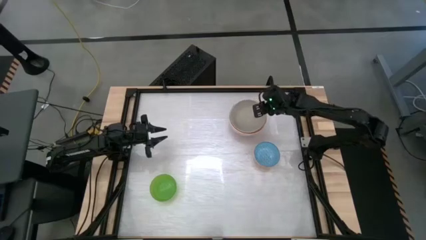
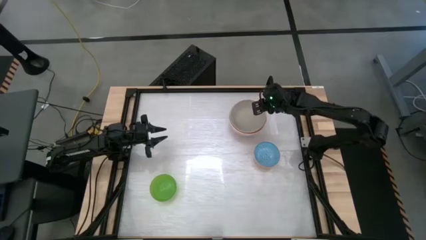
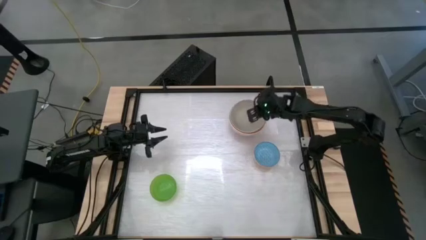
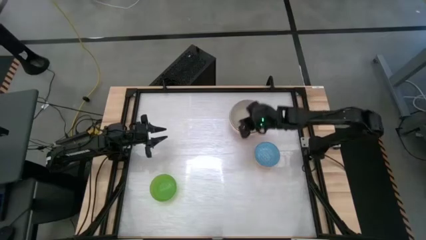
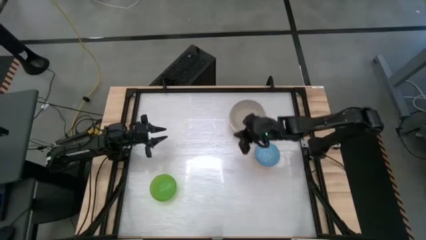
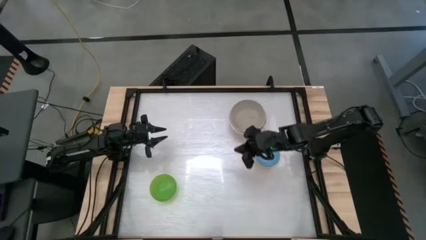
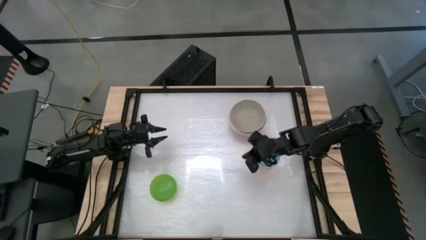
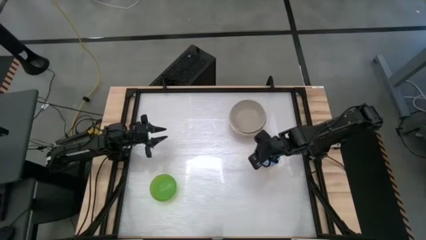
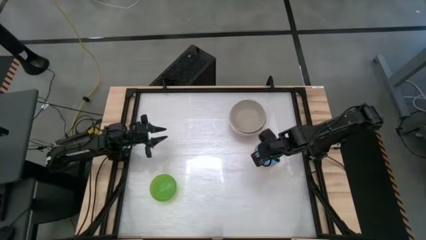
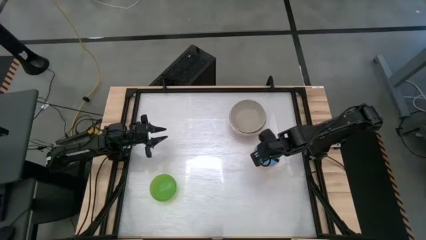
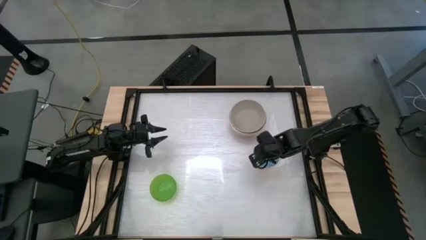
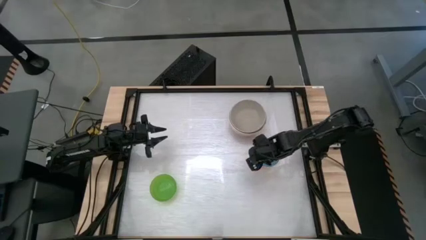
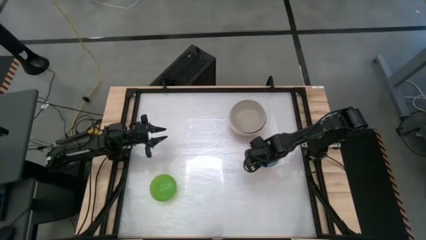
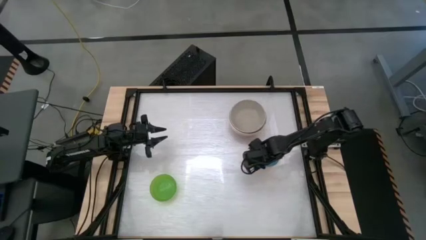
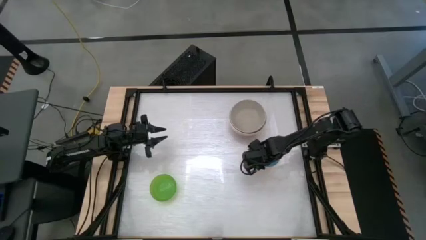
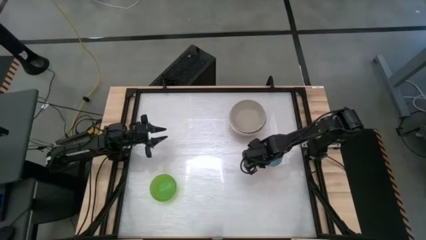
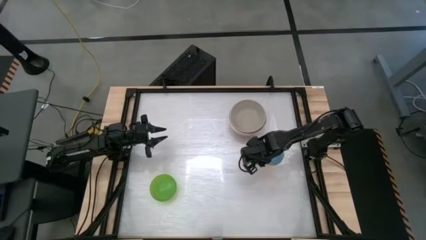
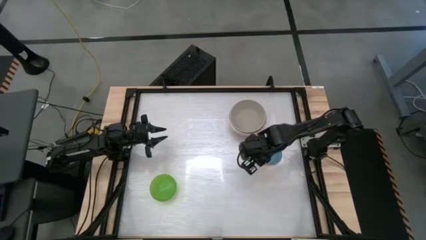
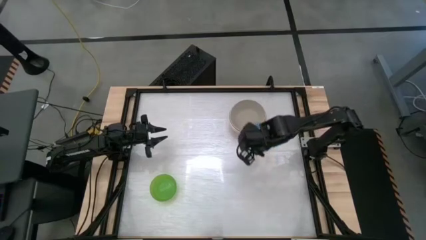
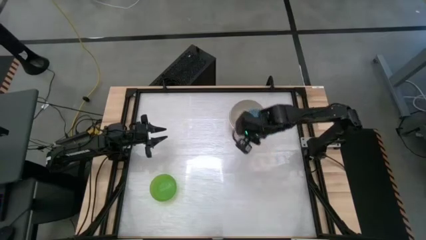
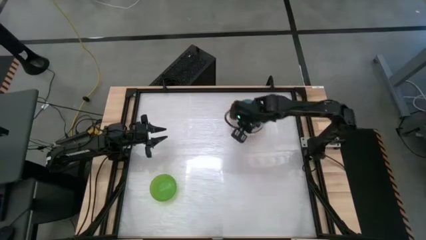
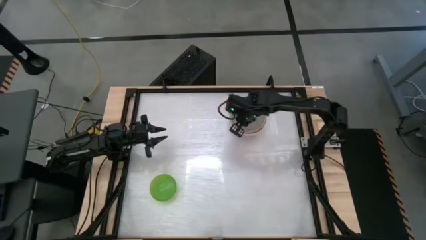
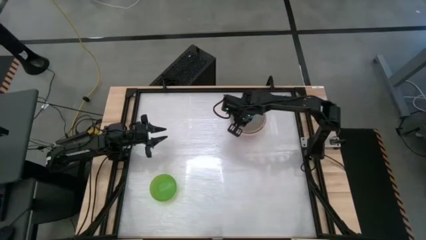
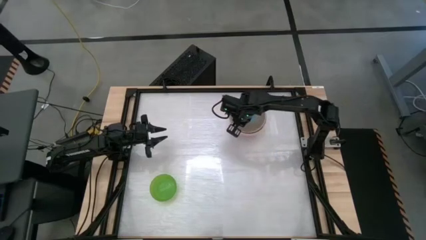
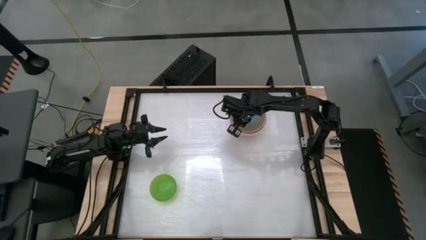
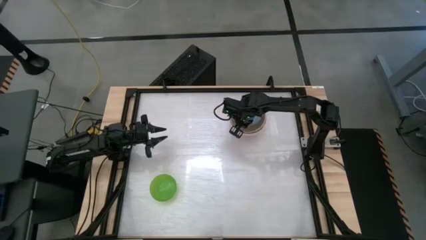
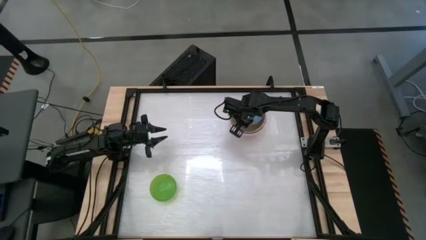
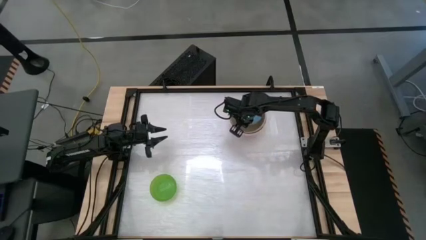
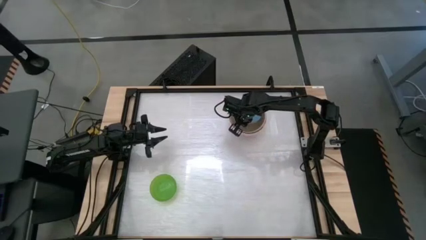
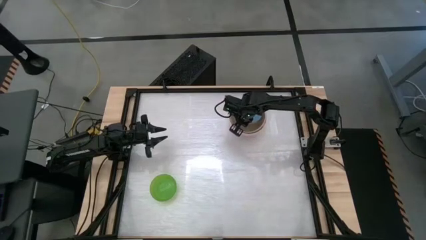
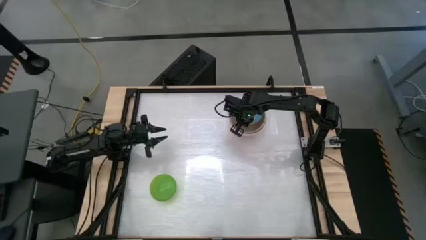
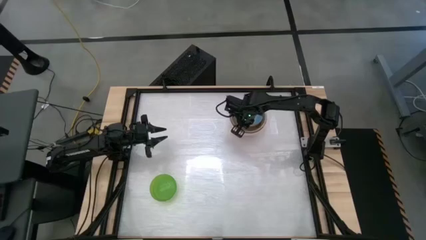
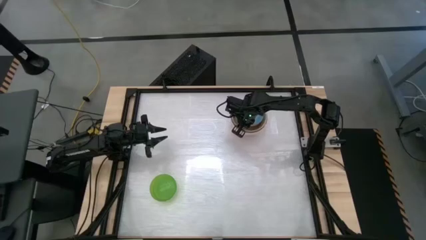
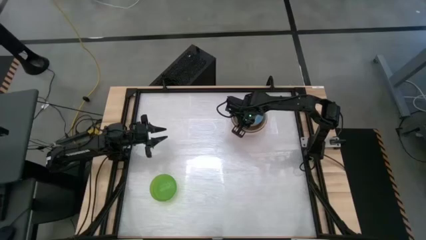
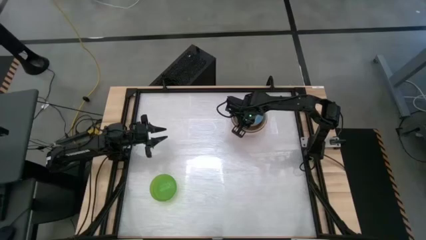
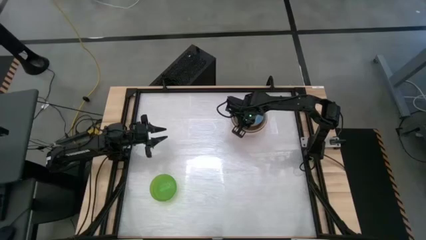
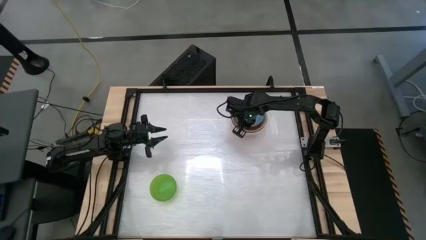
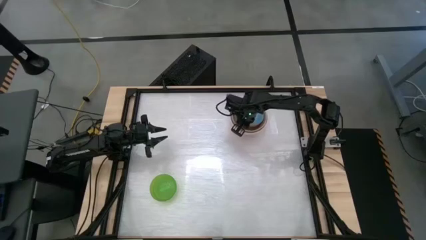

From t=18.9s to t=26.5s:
Stack the blue bowl on top of the gray bowl

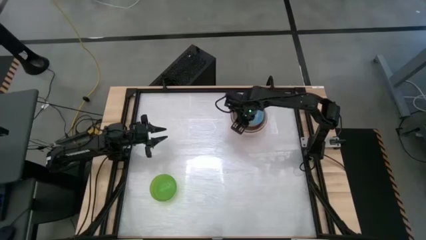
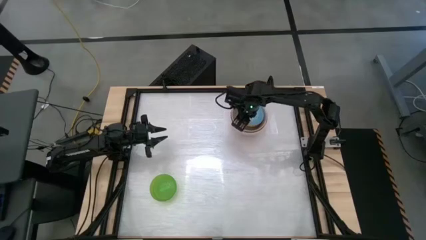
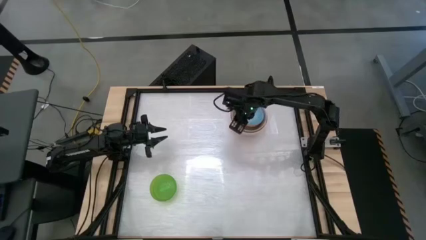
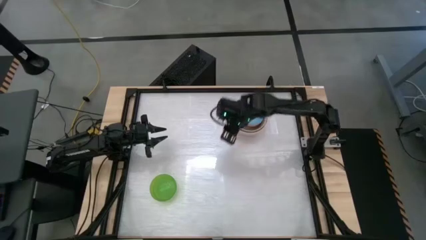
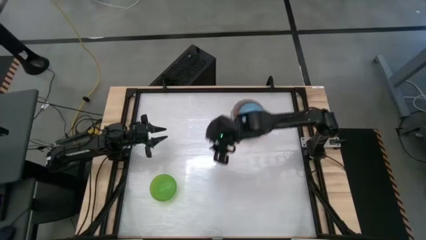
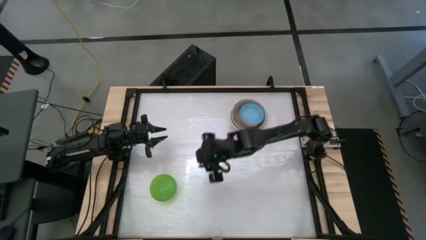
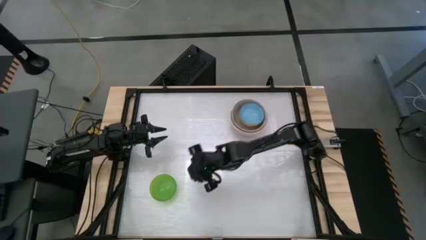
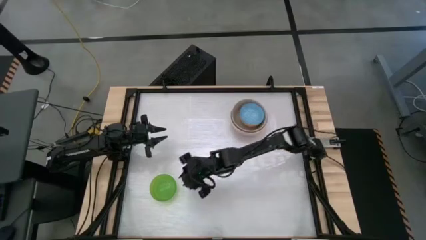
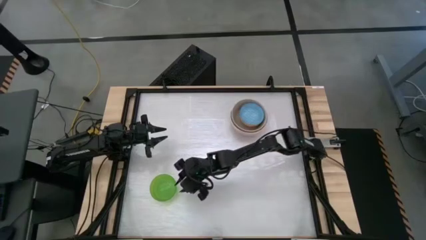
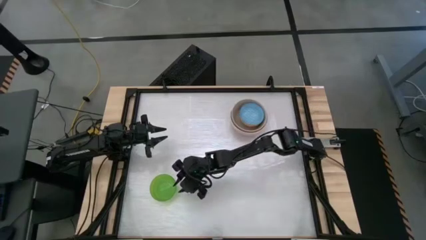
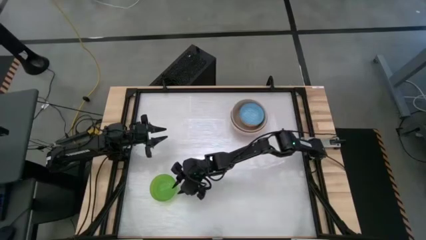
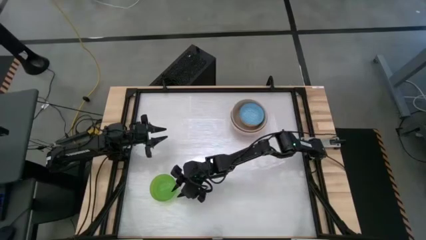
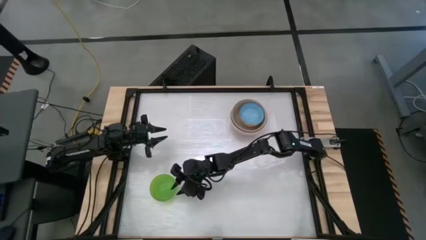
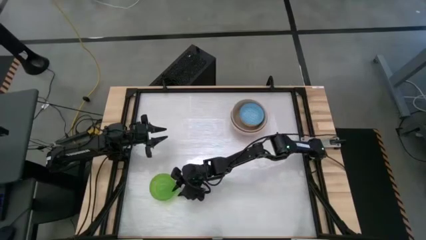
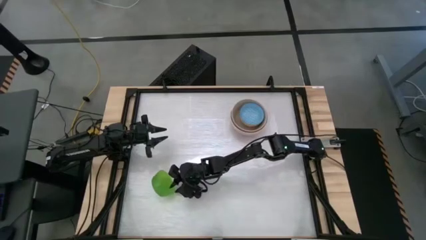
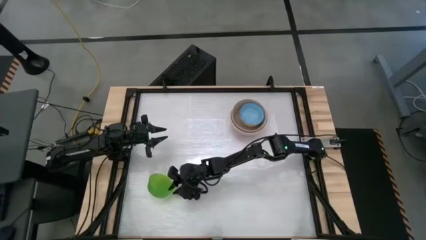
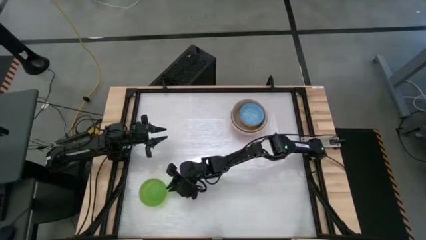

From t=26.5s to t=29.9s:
Stack the green bowl on top of the blue bowl

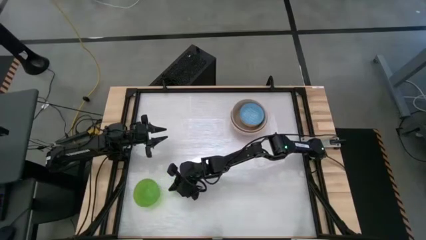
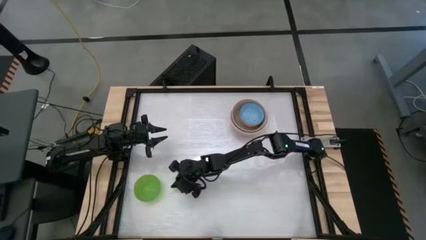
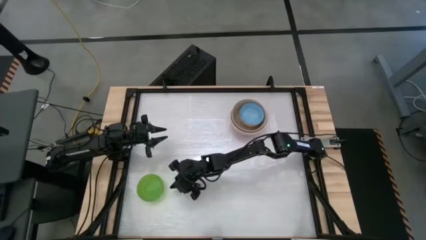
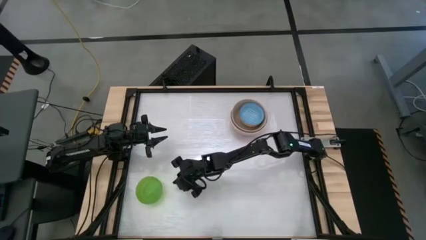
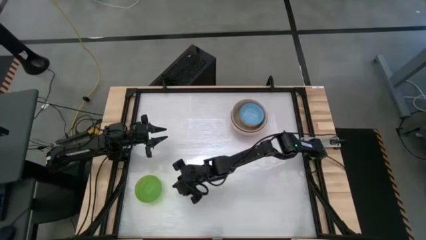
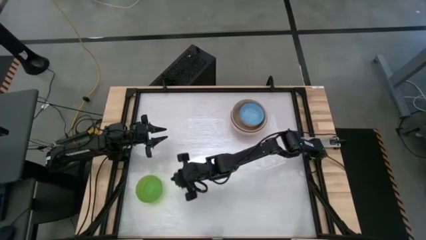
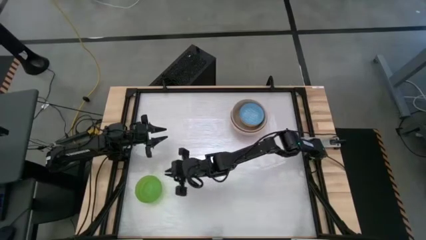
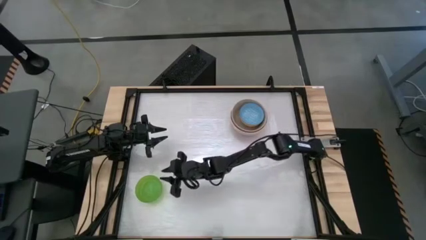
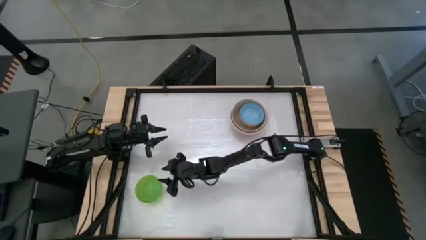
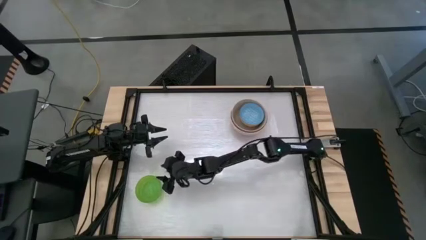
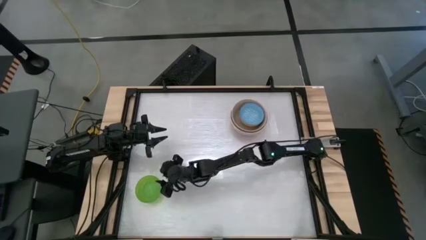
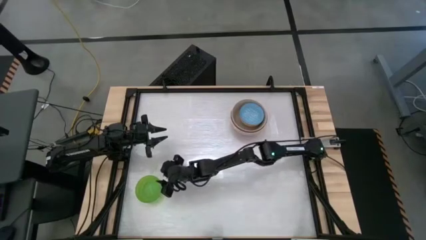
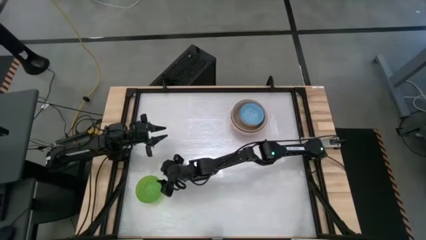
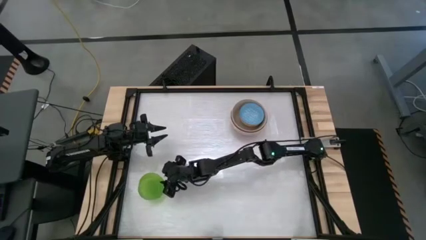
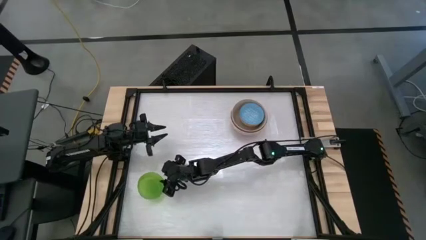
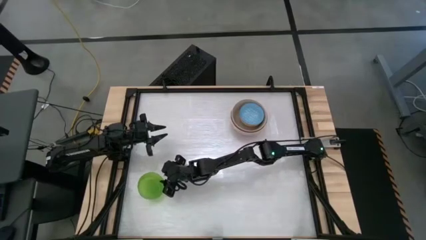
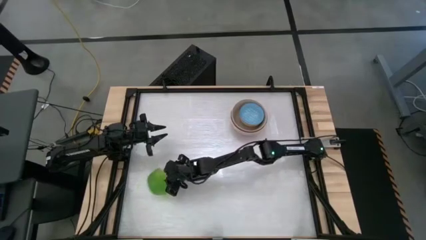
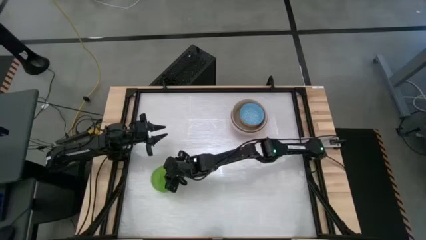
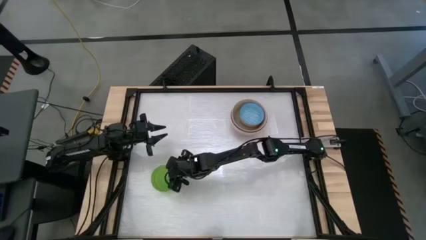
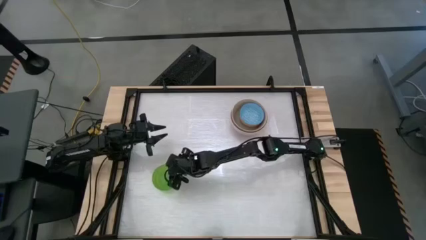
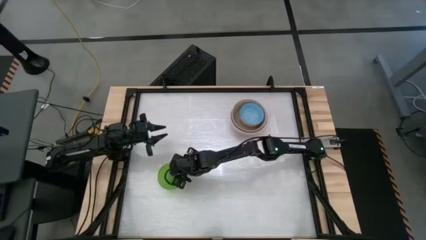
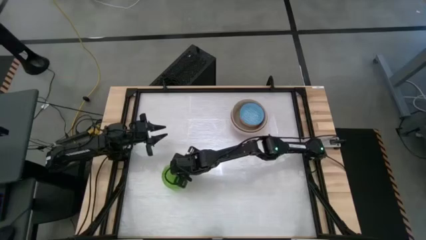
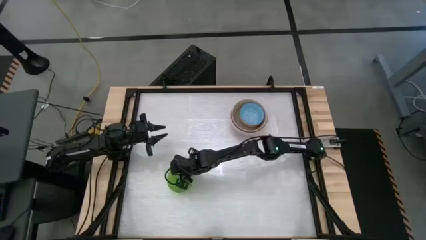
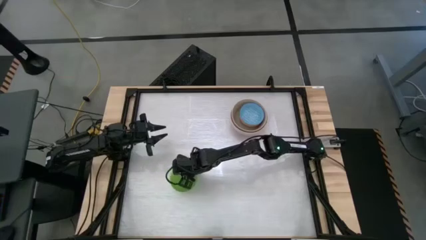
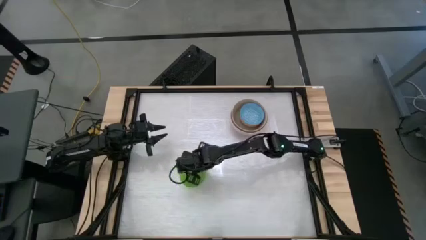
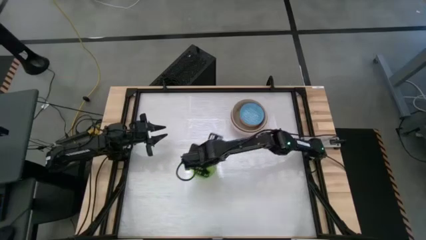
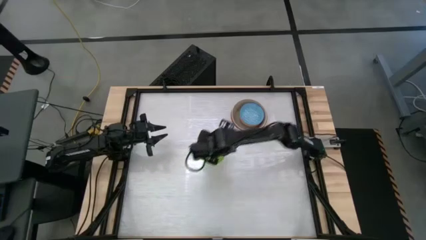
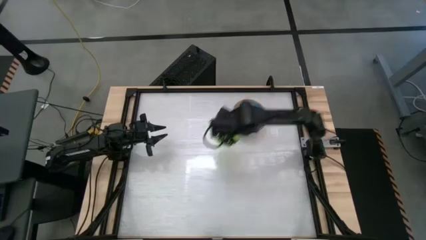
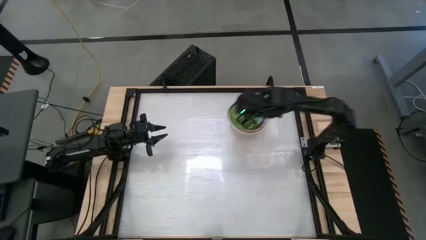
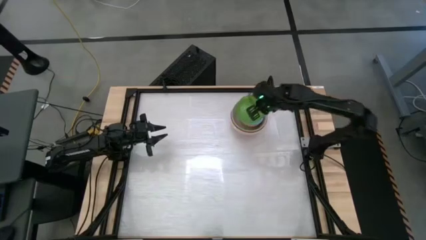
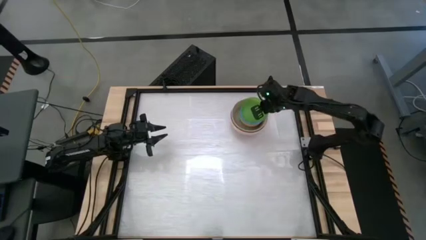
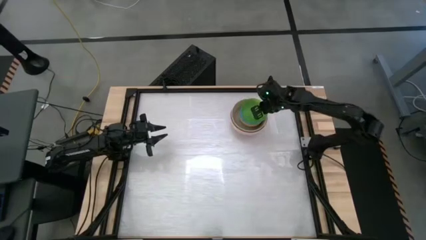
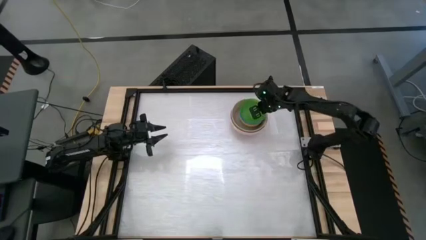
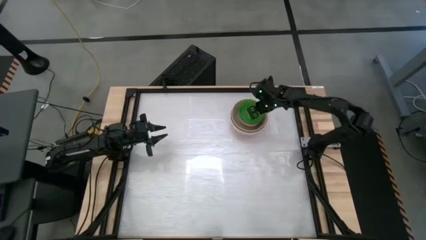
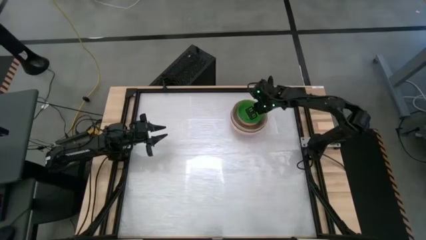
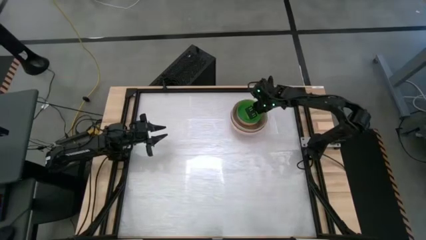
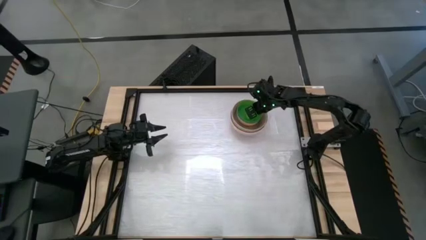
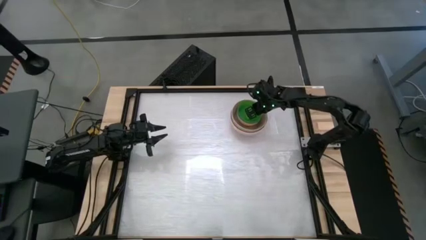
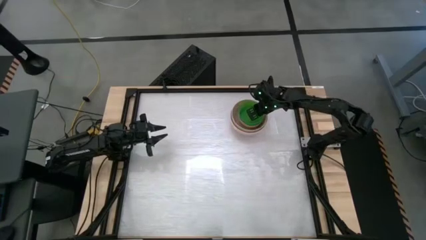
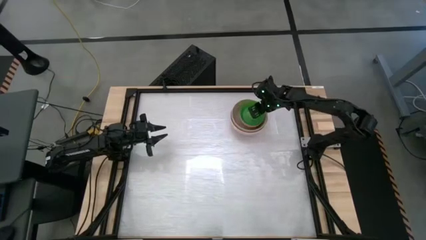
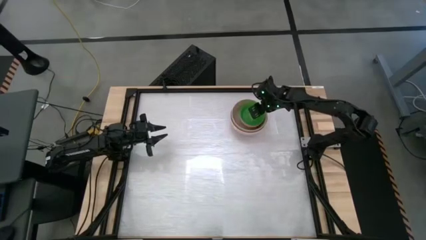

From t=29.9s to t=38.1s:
Stack the green bowl on top of the blue bowl
